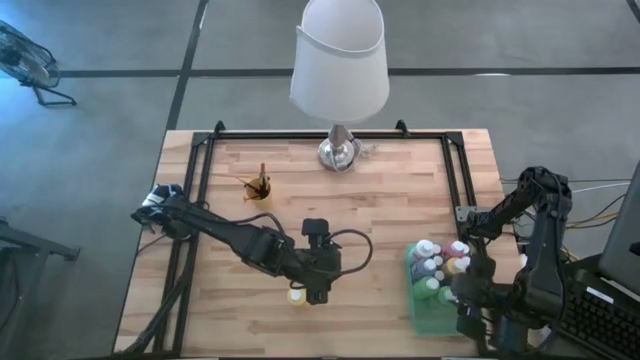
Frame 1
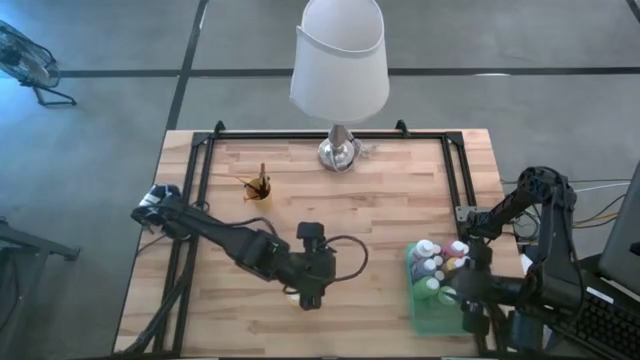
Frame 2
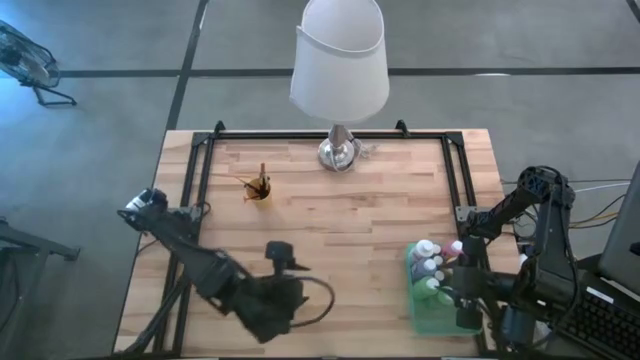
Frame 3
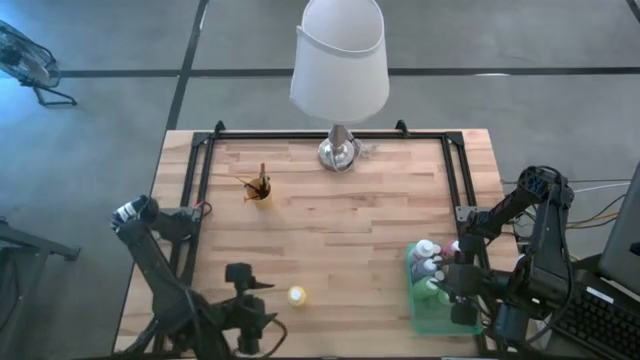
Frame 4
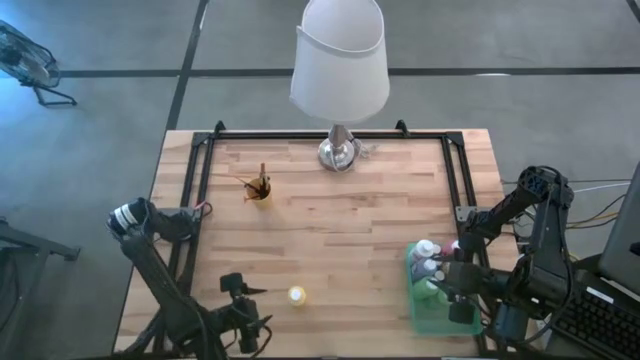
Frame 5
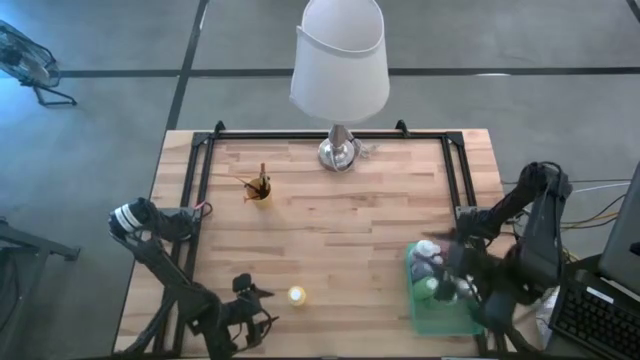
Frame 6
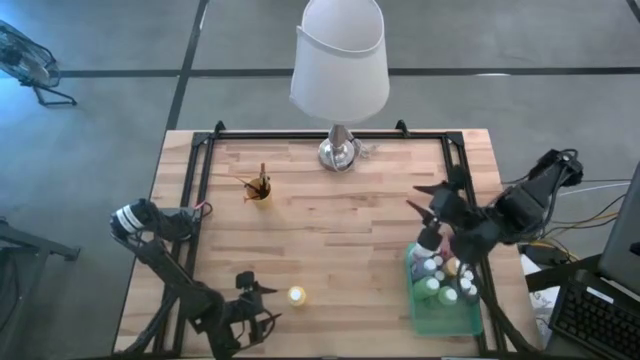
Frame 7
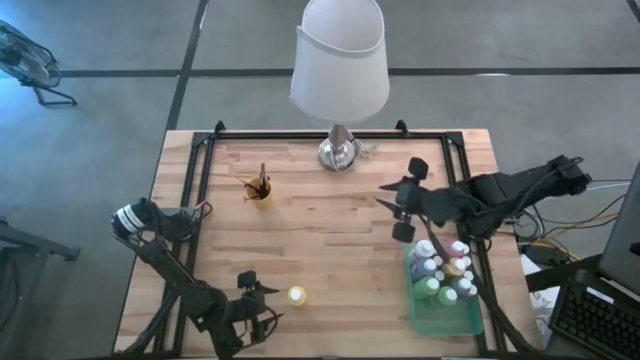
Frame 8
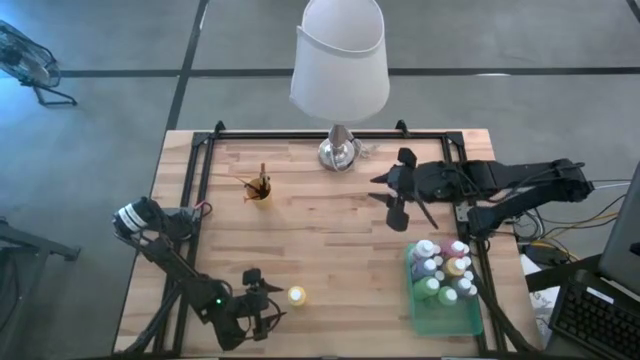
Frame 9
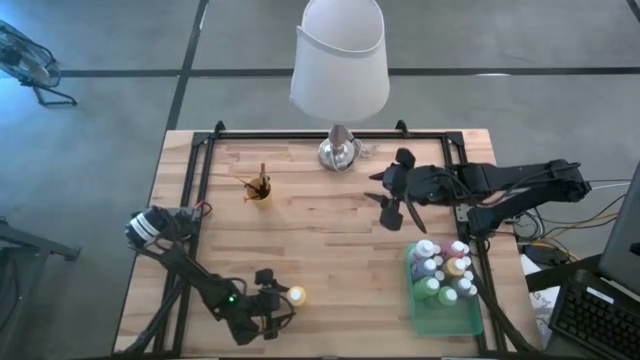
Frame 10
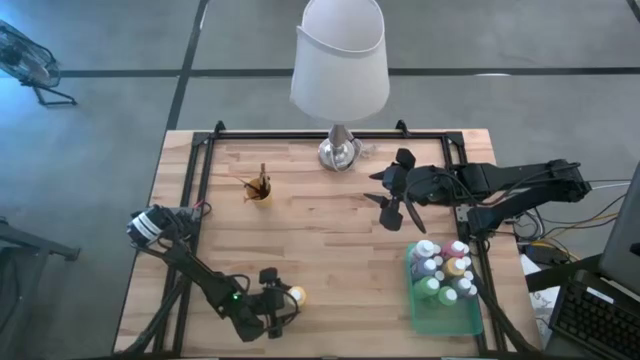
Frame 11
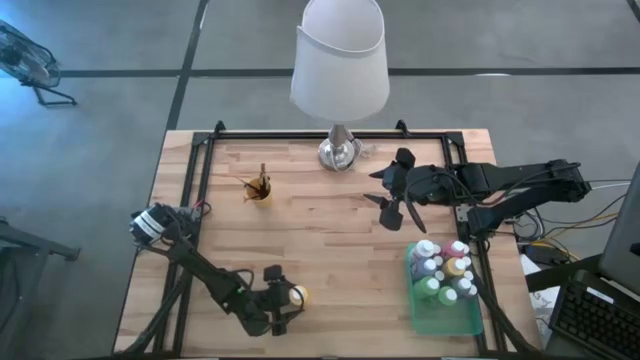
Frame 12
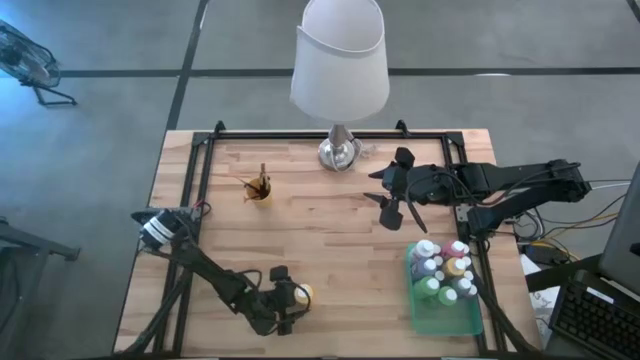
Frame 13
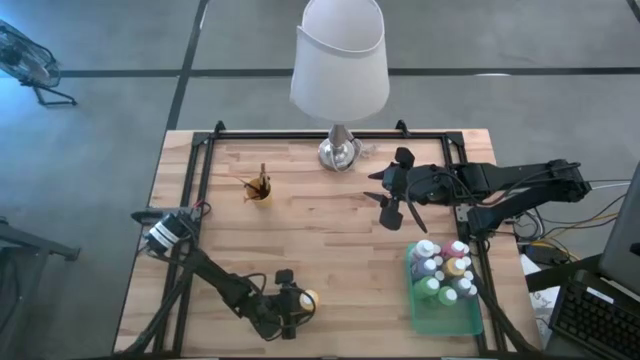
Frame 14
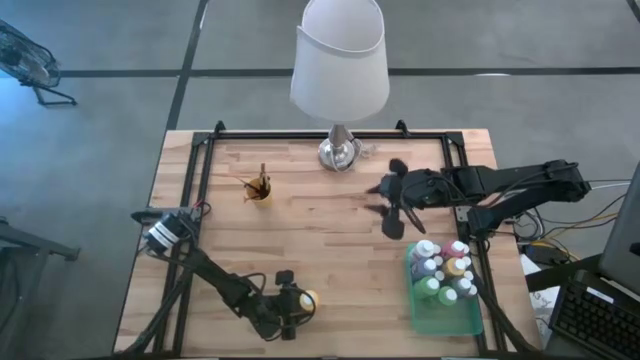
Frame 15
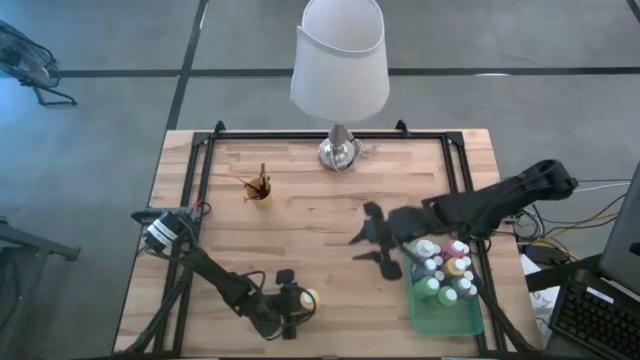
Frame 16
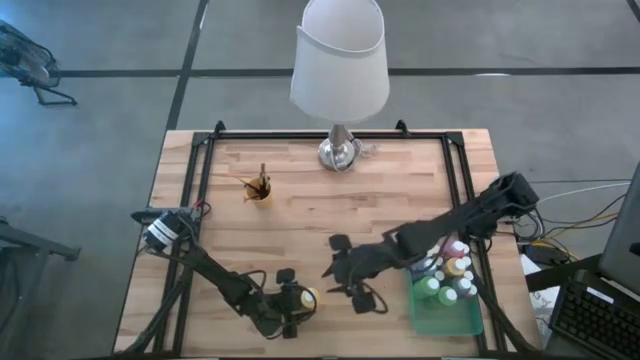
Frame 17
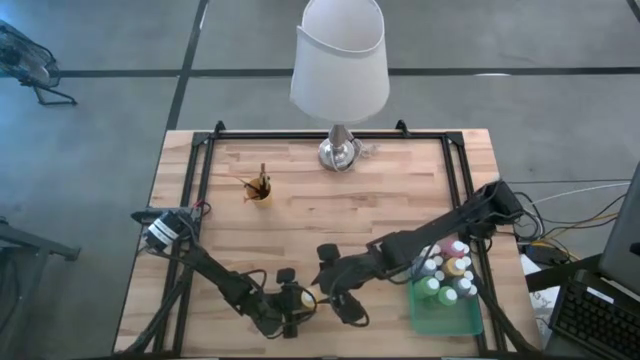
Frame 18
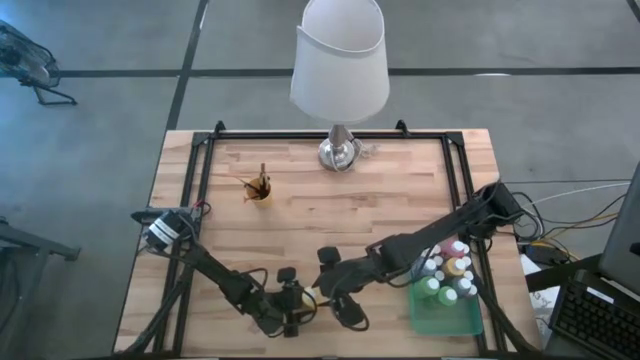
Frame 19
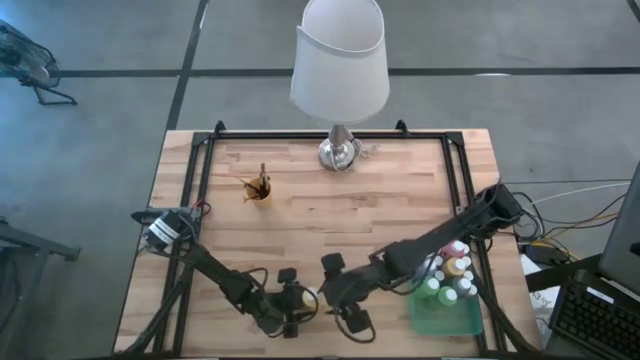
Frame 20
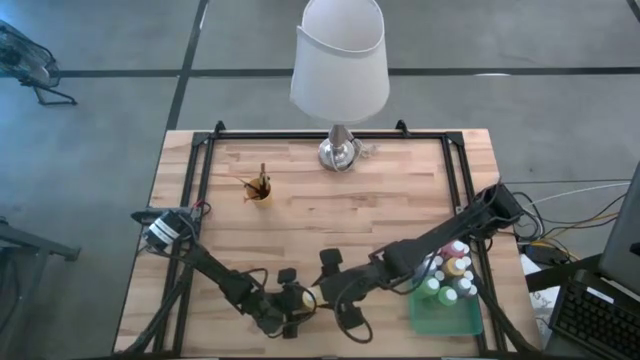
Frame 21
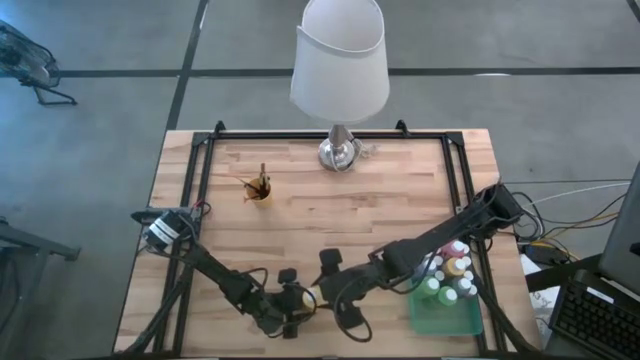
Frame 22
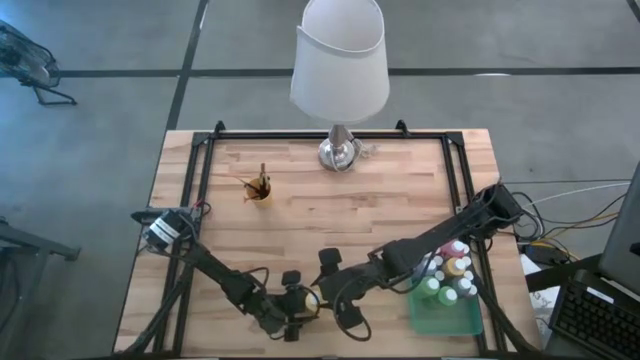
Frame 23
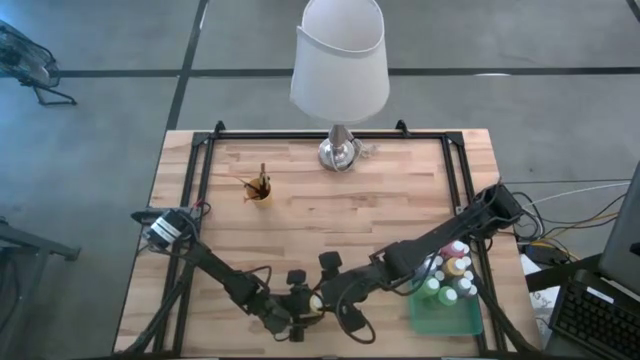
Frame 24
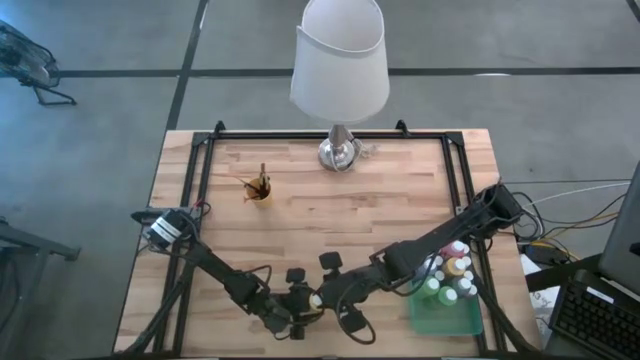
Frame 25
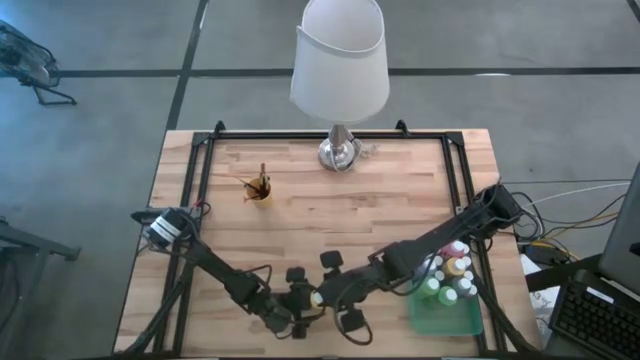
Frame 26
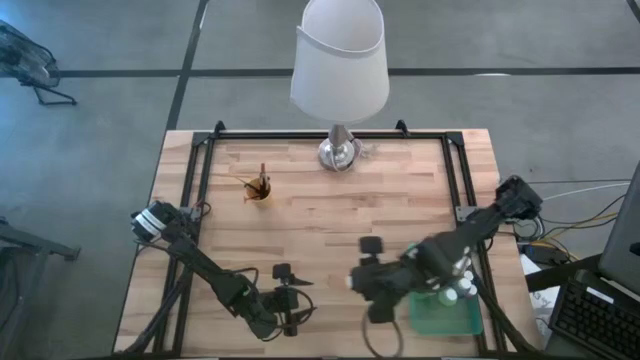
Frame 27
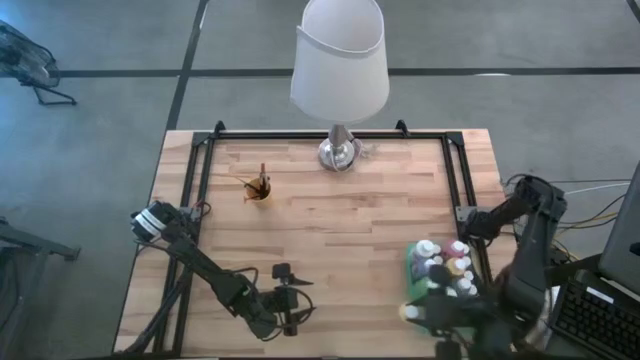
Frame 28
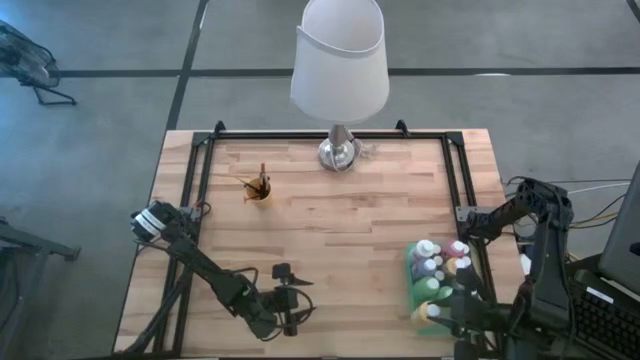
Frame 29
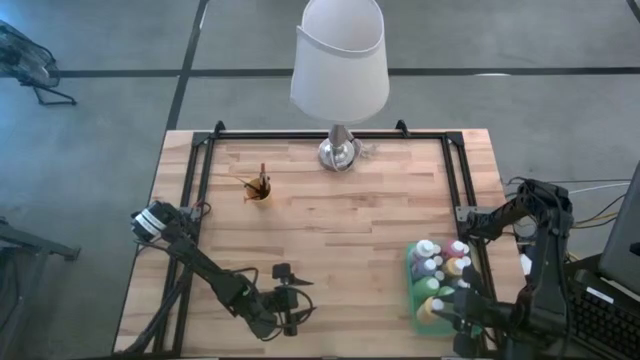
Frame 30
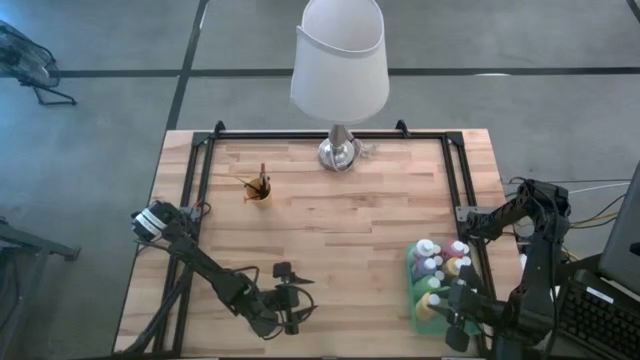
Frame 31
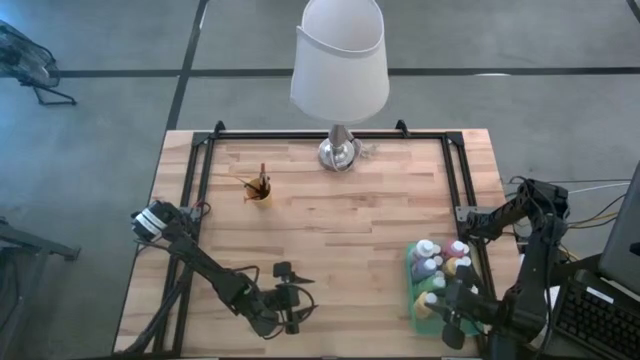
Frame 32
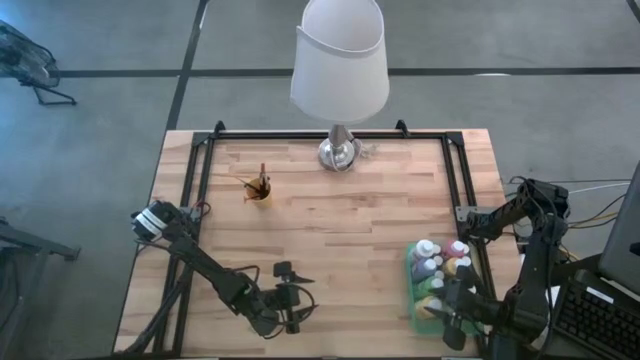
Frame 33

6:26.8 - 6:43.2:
Task: Pick & Place Paint Supplies
Put the yellow paint bottle into the green bin
